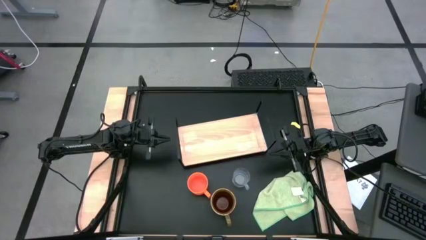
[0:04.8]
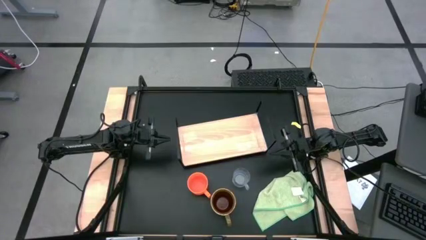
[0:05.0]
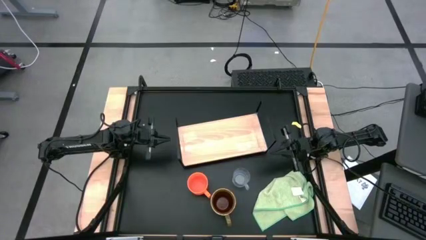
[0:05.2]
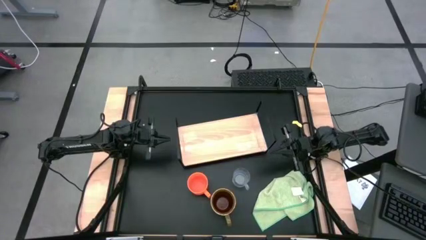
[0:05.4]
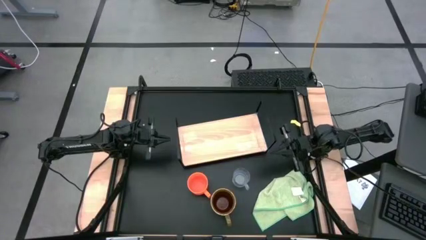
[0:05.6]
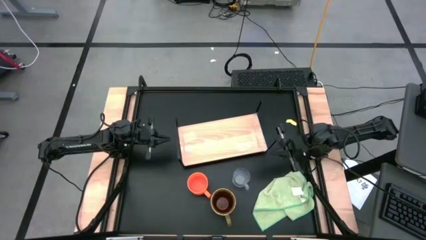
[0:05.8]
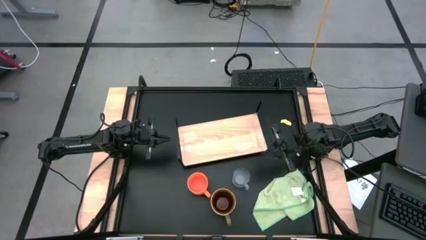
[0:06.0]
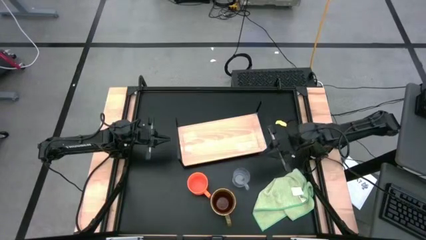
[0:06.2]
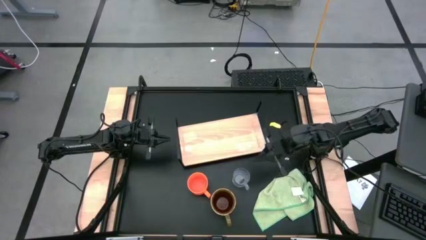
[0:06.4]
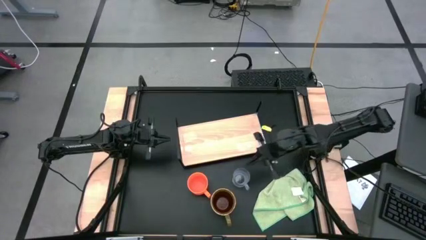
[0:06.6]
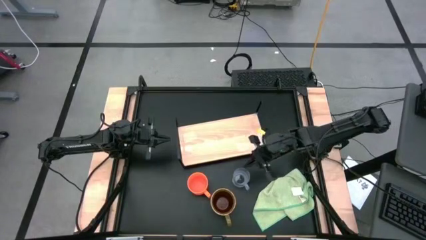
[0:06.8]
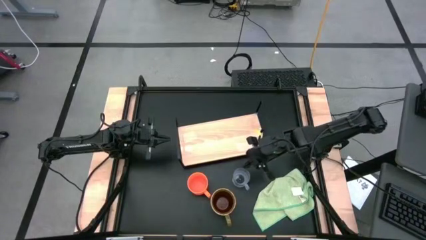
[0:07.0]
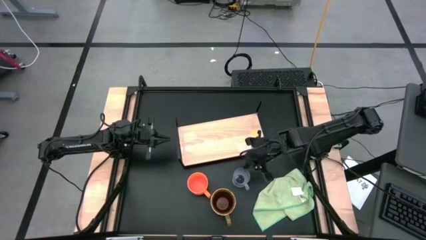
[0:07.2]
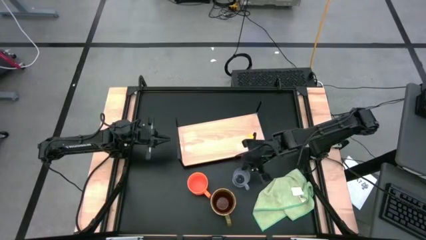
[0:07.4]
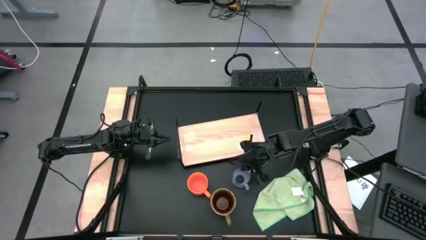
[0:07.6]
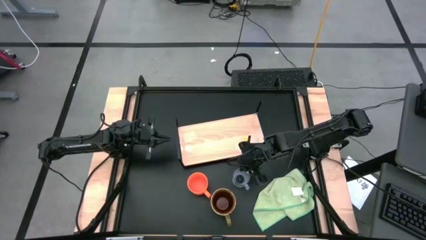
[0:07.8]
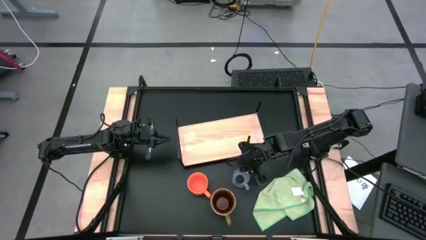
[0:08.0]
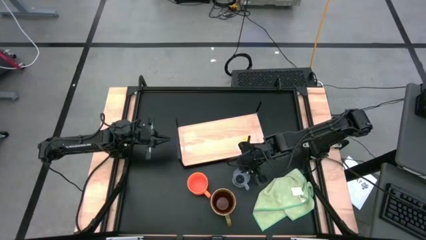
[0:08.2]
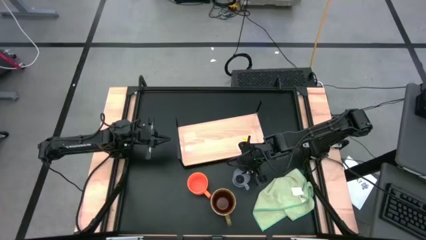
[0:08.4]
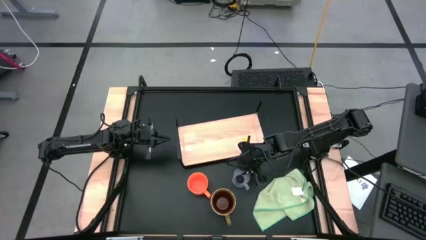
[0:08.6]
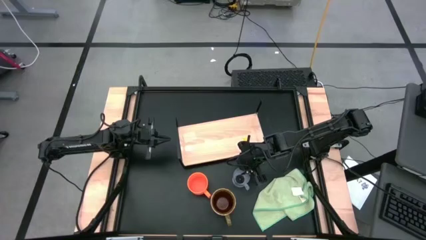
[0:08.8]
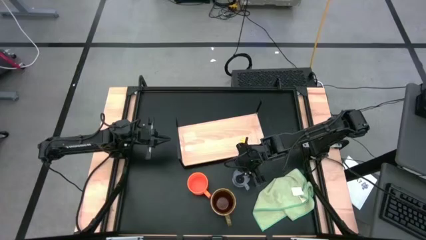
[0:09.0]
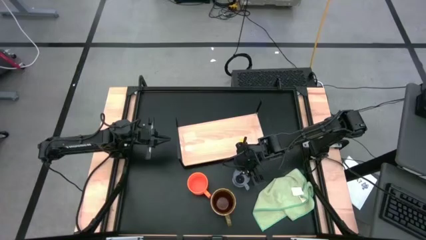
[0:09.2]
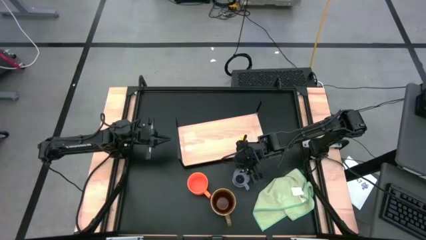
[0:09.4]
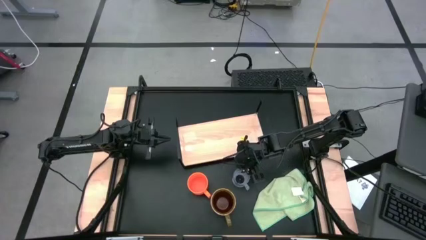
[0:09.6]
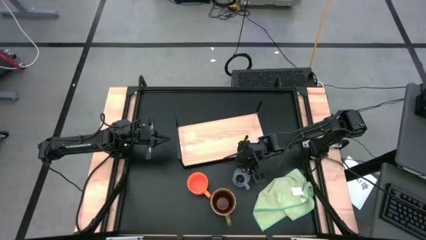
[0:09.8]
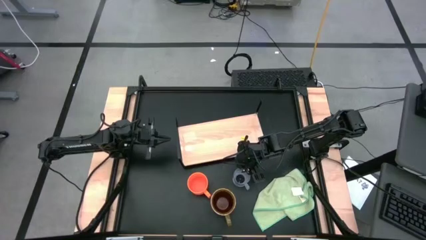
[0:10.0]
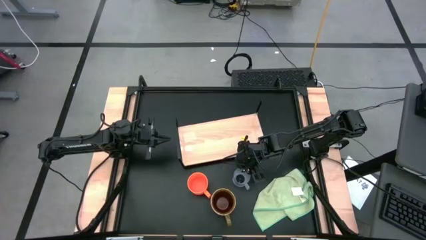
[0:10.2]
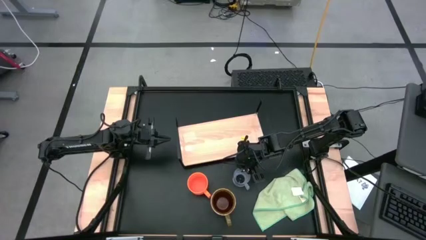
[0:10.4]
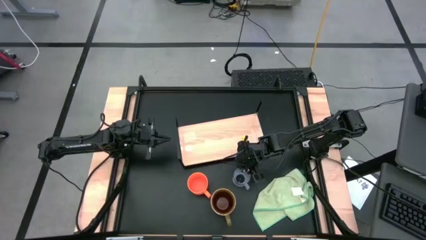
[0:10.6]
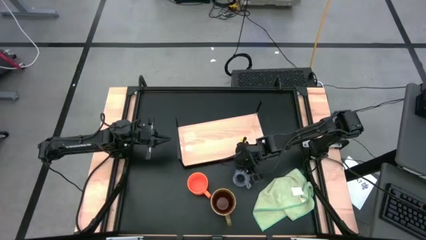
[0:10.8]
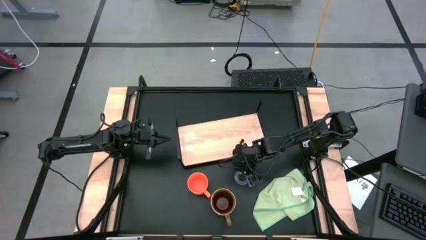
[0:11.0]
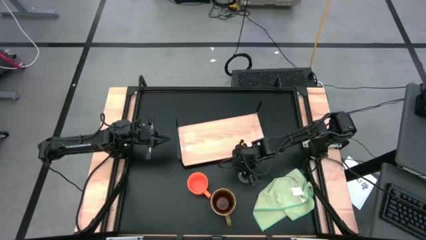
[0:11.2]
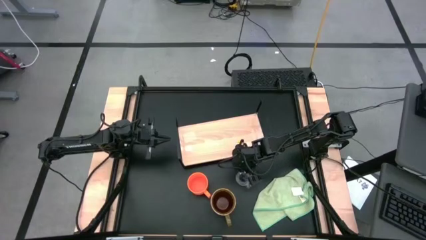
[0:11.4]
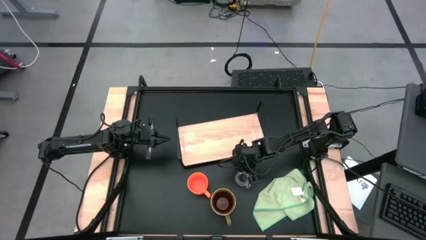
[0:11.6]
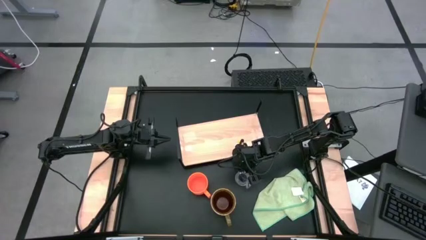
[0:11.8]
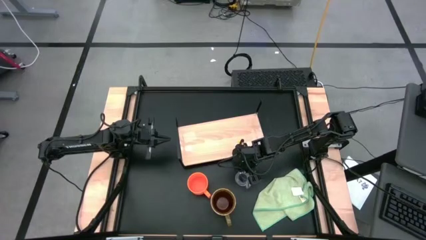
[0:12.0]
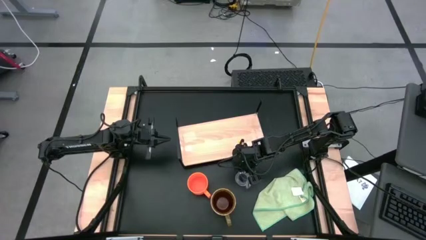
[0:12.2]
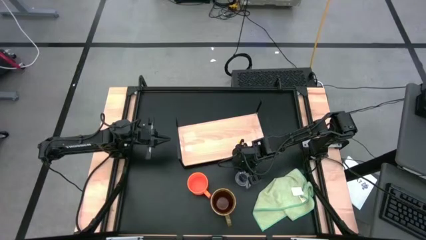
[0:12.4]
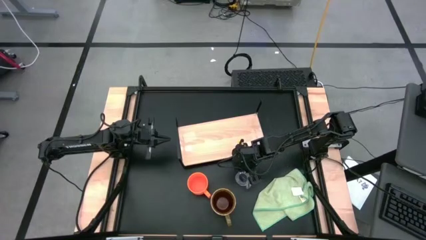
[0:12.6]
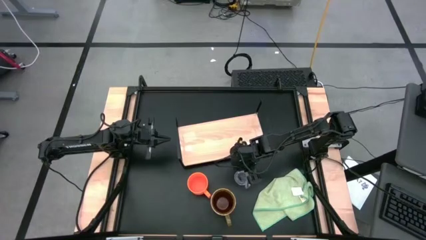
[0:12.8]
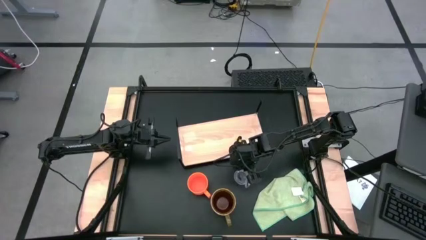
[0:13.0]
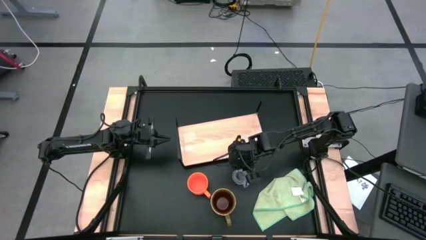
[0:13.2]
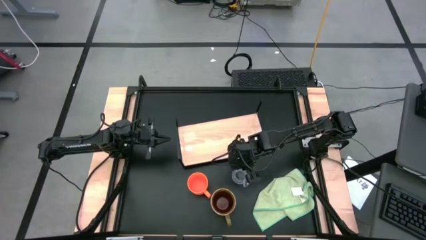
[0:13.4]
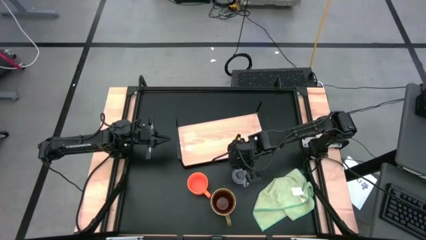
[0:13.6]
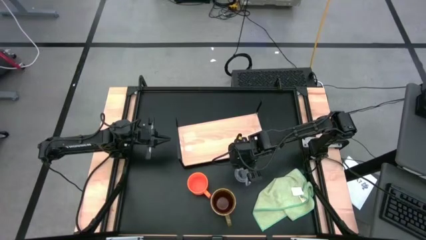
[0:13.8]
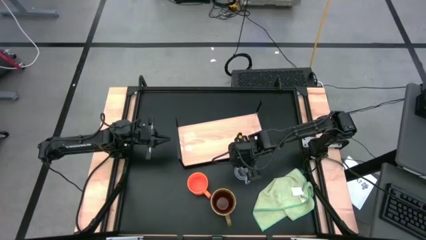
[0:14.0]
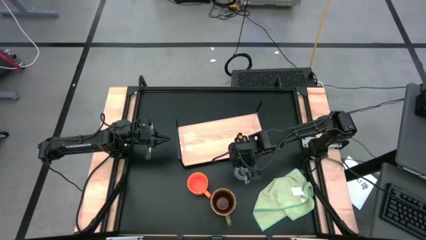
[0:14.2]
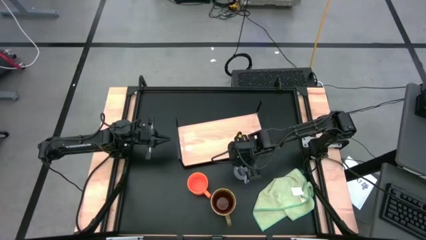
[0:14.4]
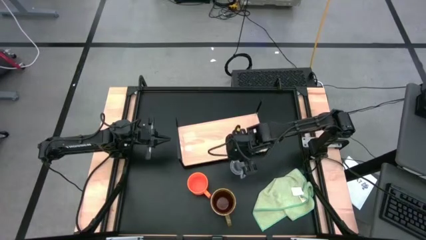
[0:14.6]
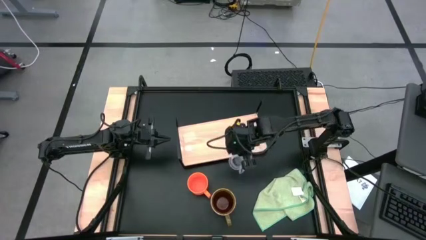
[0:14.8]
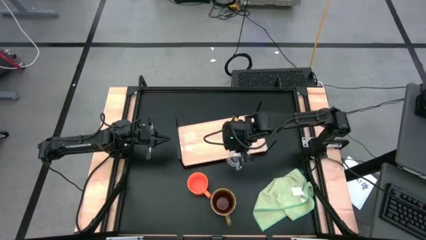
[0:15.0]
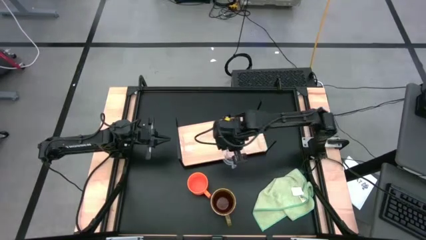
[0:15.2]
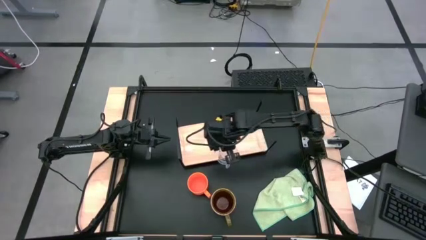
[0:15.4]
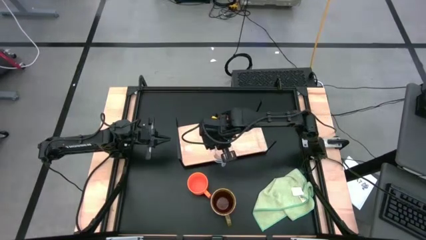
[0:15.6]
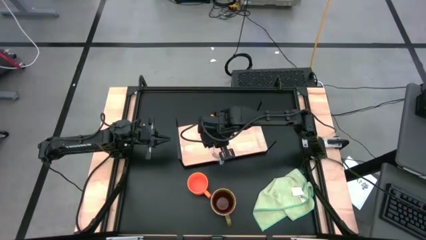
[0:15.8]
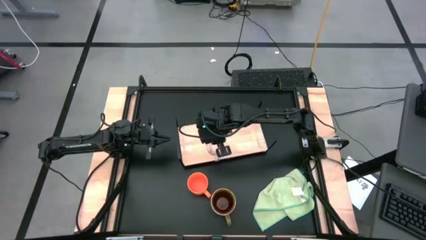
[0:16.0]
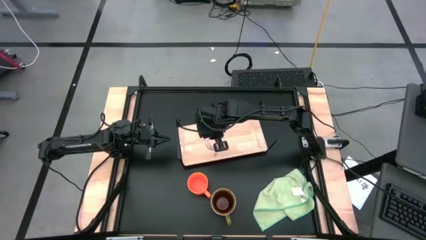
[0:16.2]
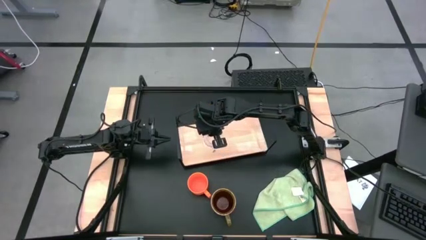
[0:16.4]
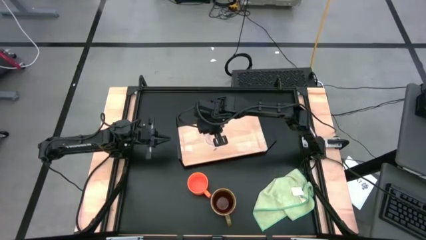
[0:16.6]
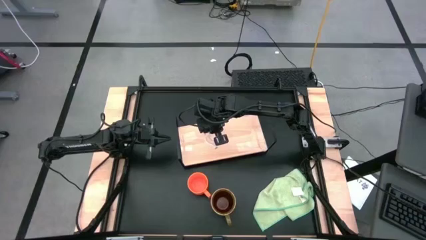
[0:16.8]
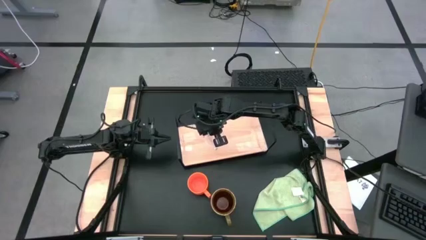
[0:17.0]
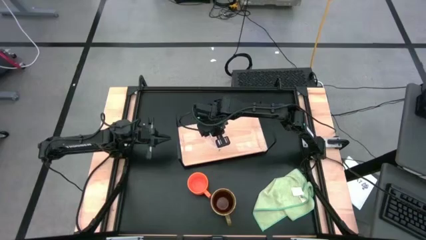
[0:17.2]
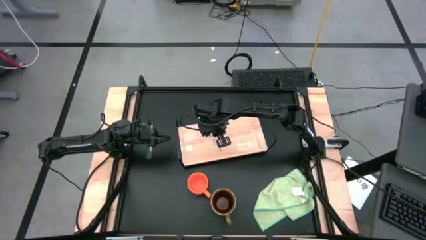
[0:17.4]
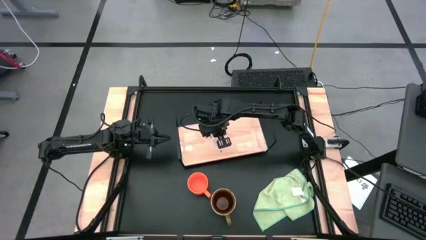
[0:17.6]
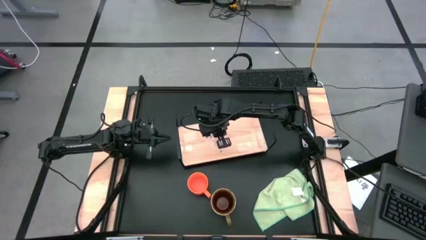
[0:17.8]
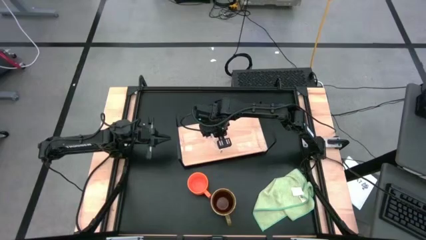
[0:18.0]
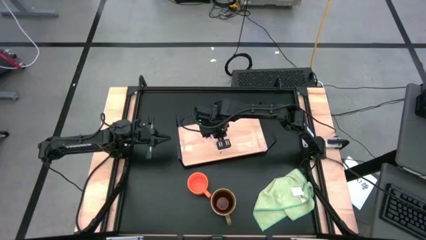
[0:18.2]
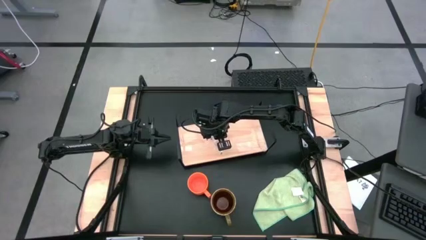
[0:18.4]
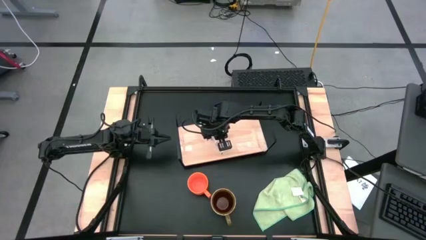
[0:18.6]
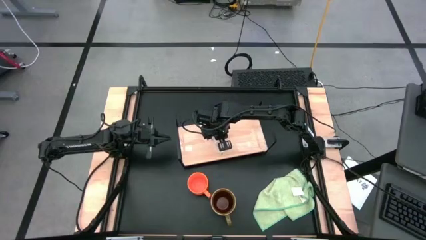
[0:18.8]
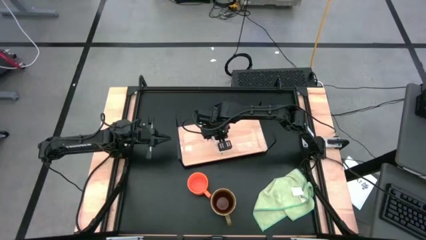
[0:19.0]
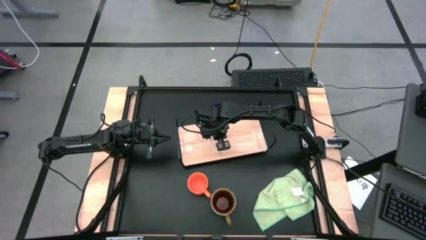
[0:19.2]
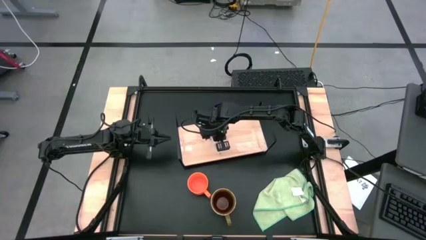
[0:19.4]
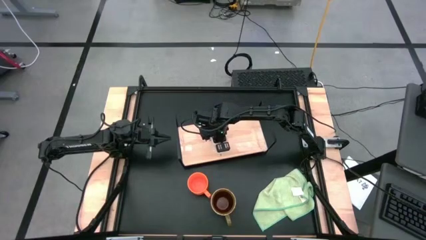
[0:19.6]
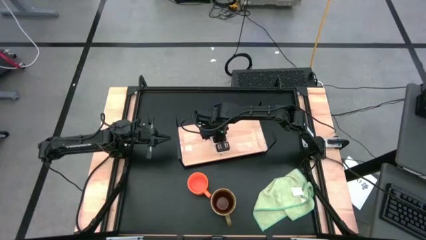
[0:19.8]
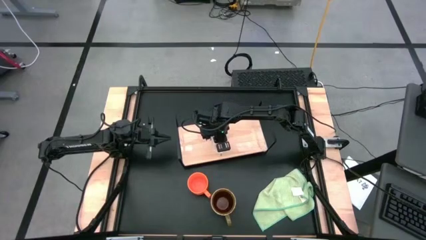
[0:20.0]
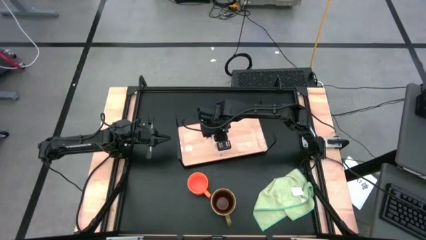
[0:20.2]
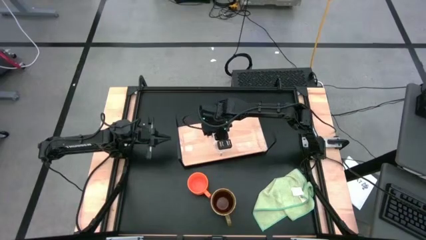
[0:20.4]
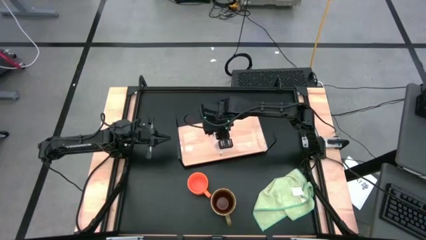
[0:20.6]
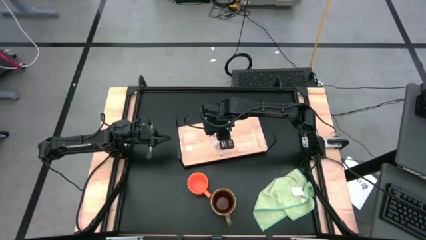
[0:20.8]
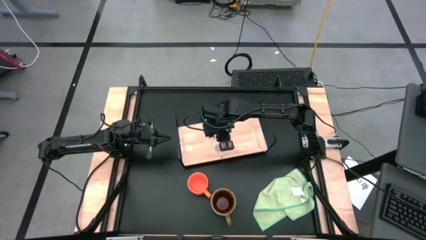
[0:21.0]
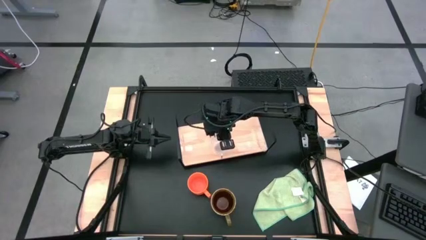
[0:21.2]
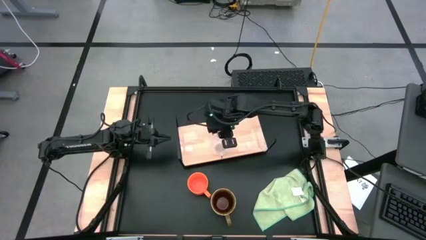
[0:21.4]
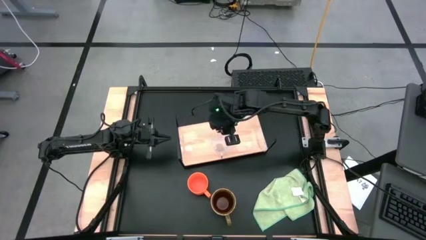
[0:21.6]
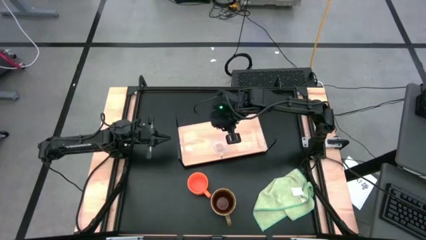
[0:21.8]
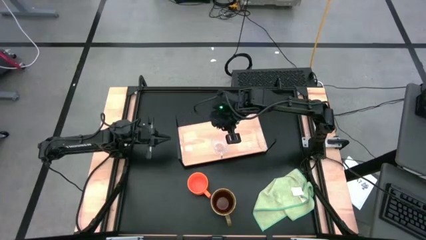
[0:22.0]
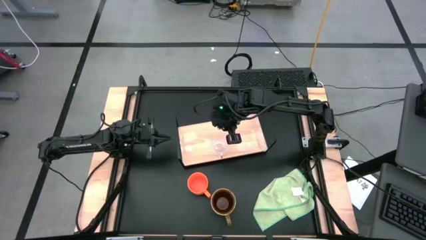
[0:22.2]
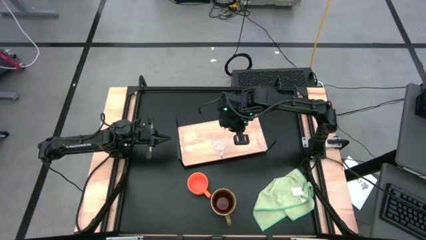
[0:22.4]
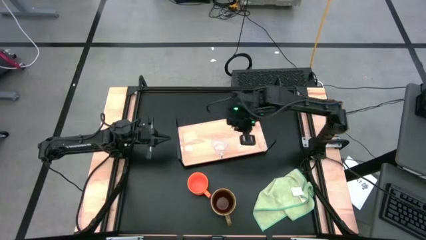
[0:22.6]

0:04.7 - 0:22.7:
Task: Stack small to large cups/mugs on shelf
Put the transparent mug on the shelf
